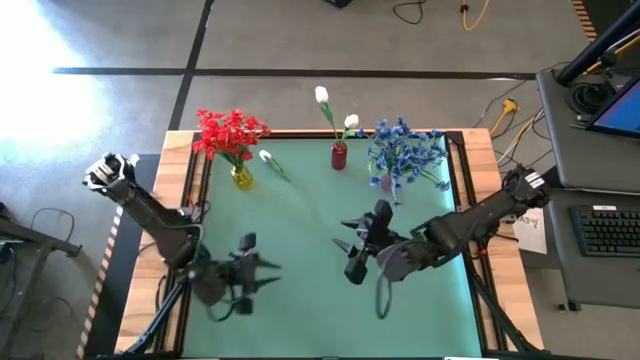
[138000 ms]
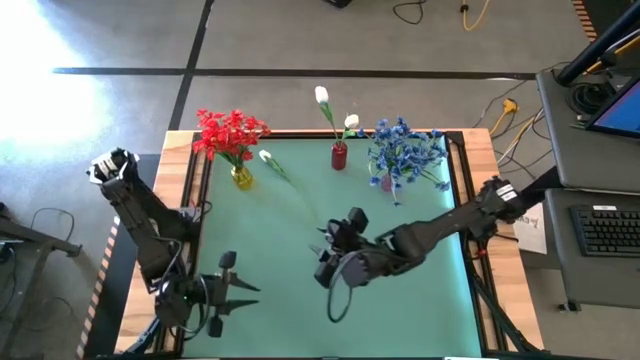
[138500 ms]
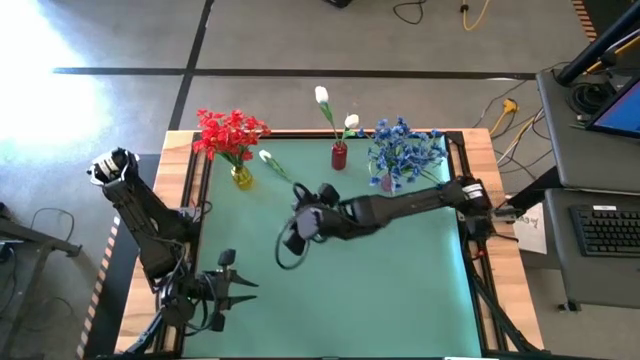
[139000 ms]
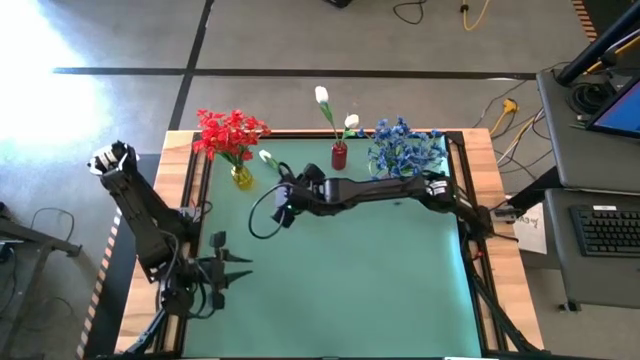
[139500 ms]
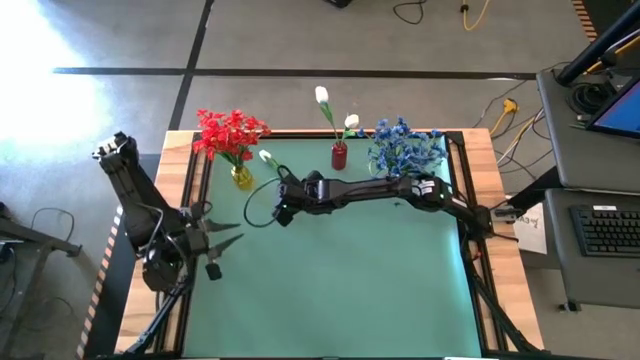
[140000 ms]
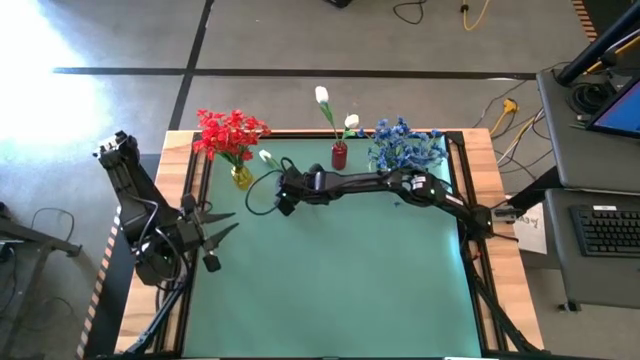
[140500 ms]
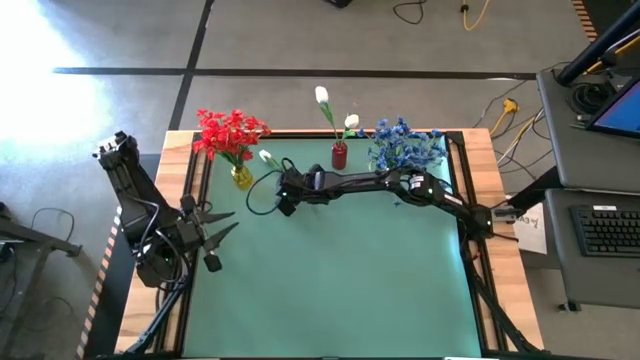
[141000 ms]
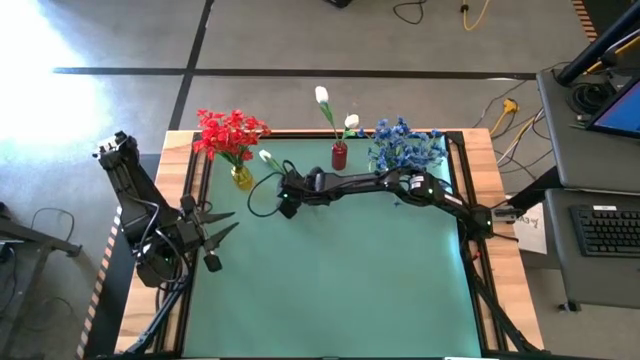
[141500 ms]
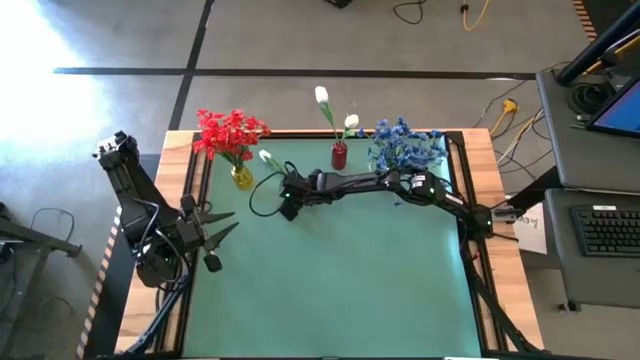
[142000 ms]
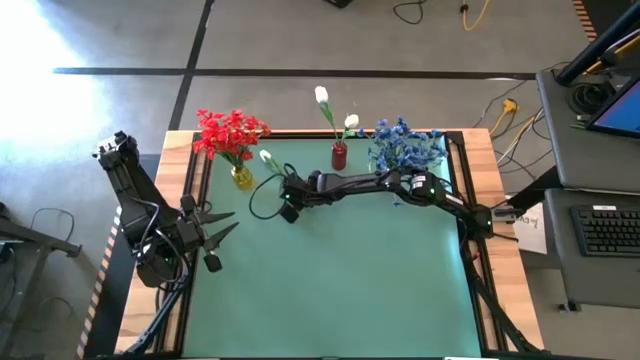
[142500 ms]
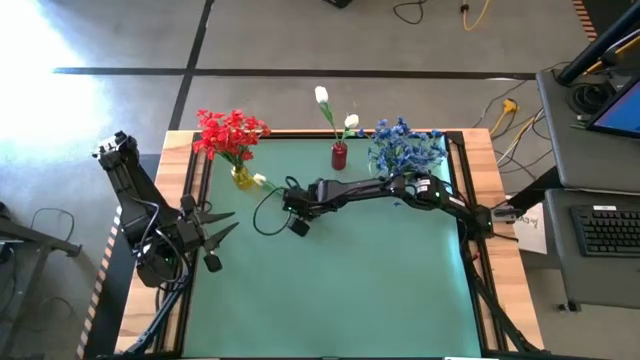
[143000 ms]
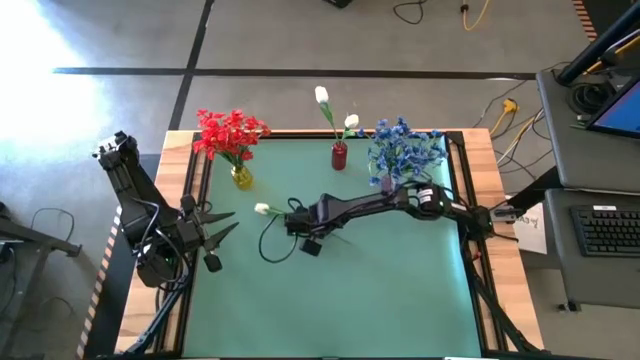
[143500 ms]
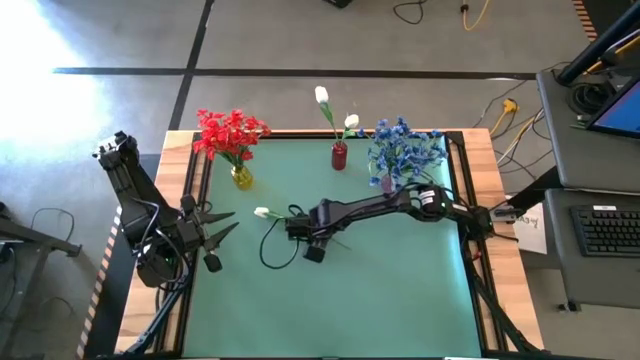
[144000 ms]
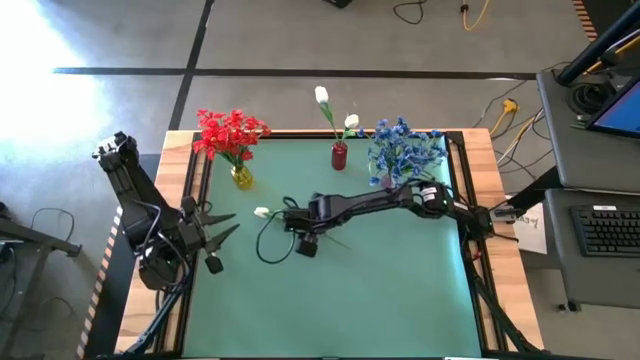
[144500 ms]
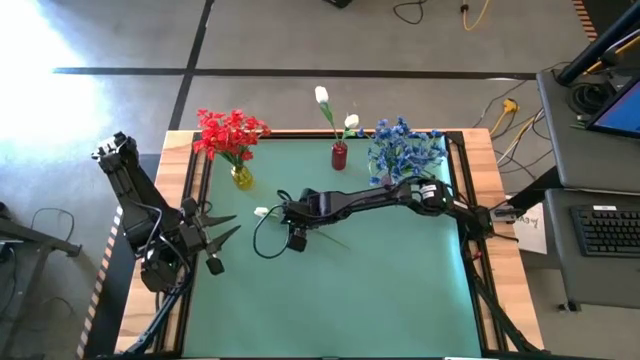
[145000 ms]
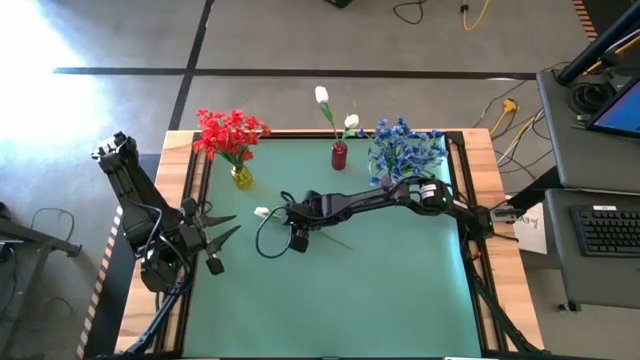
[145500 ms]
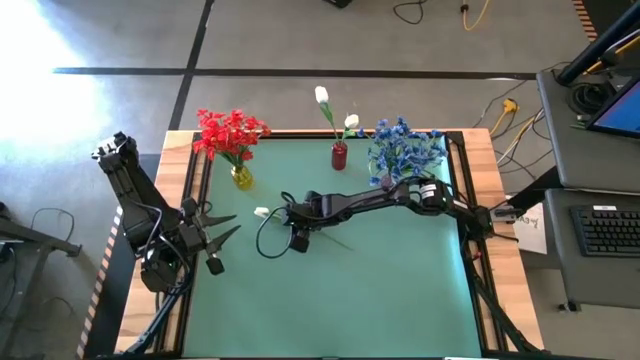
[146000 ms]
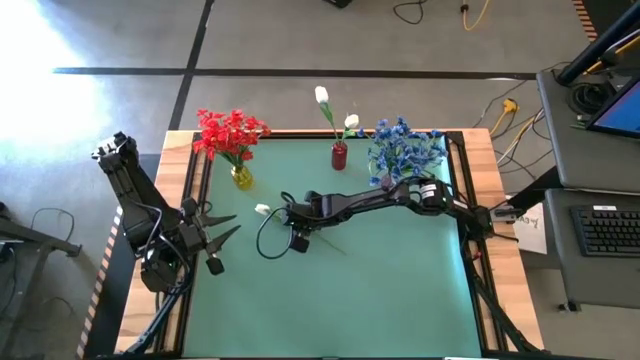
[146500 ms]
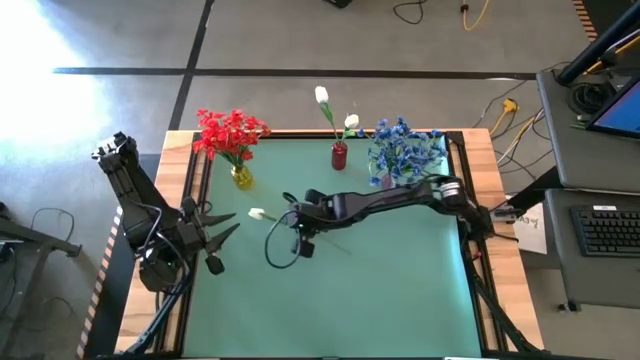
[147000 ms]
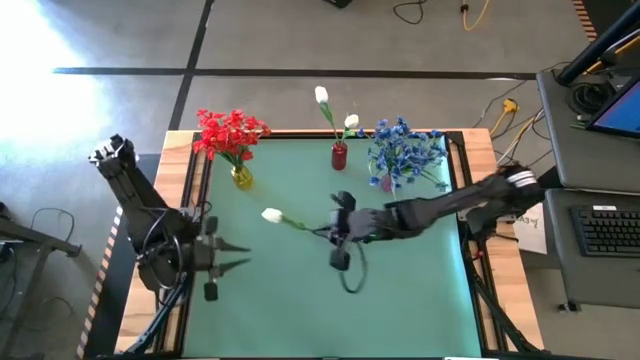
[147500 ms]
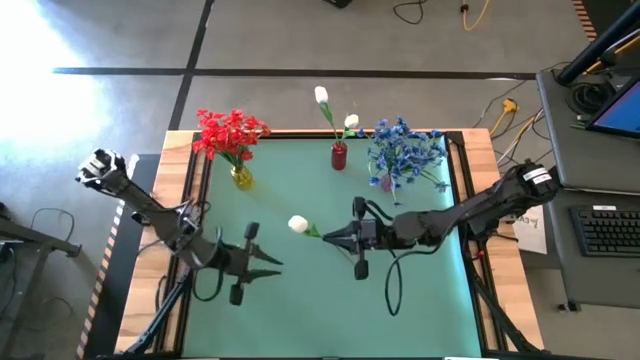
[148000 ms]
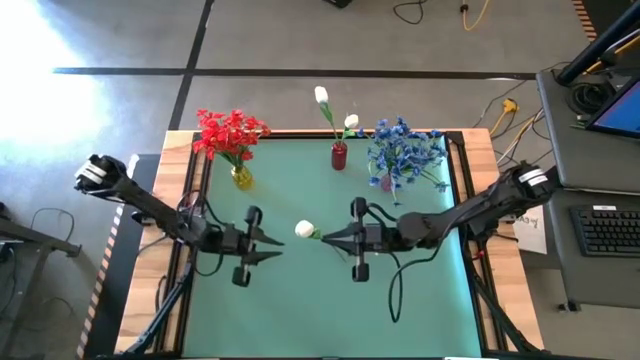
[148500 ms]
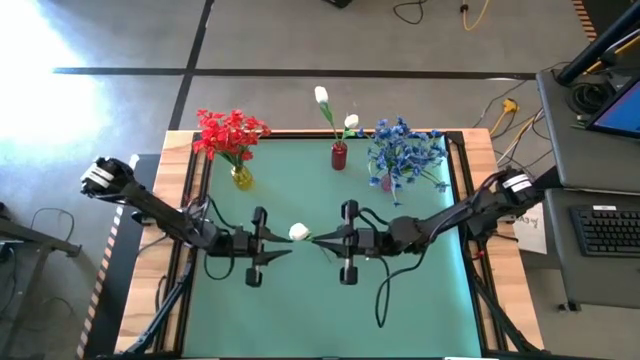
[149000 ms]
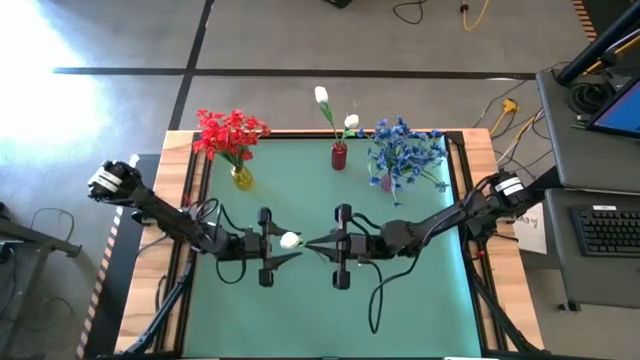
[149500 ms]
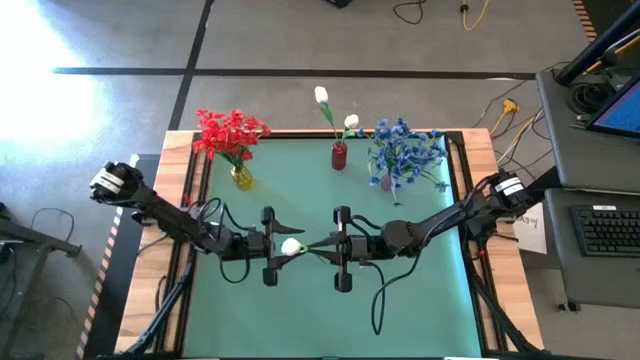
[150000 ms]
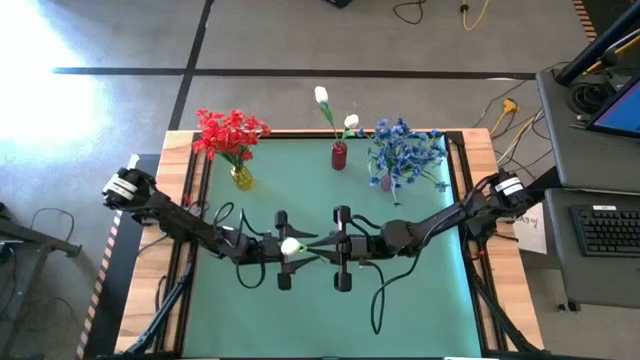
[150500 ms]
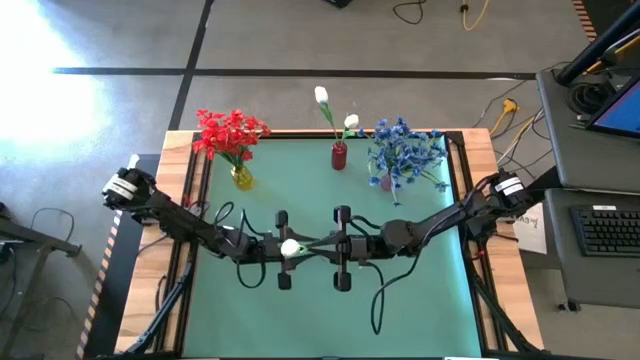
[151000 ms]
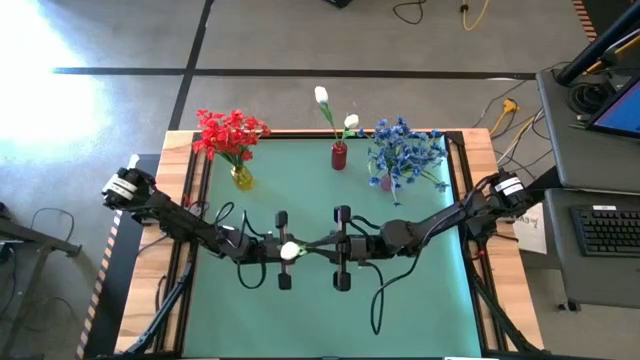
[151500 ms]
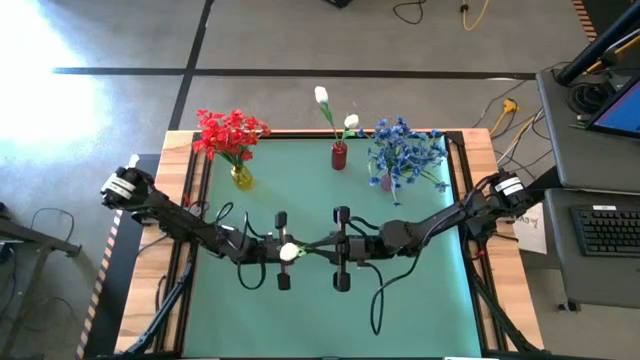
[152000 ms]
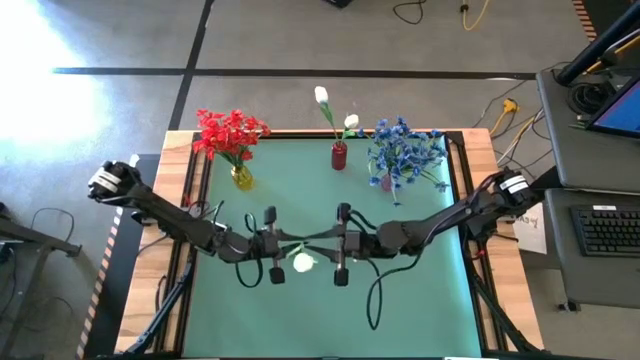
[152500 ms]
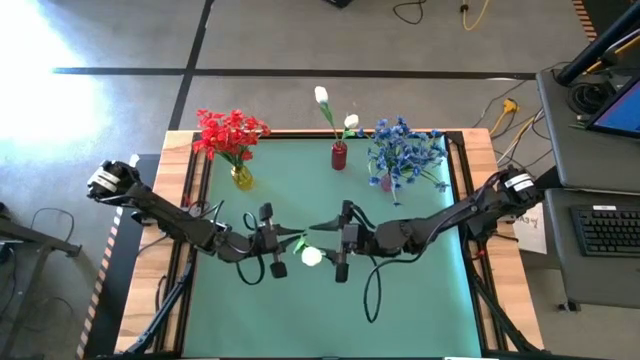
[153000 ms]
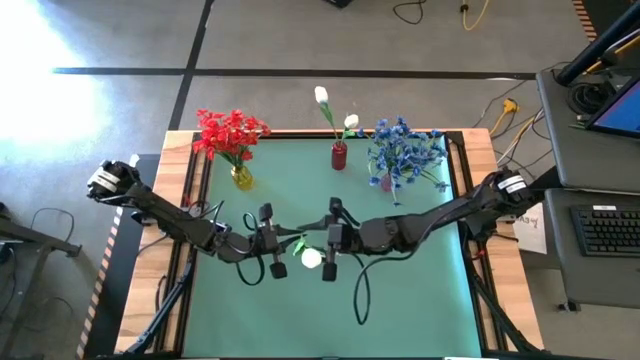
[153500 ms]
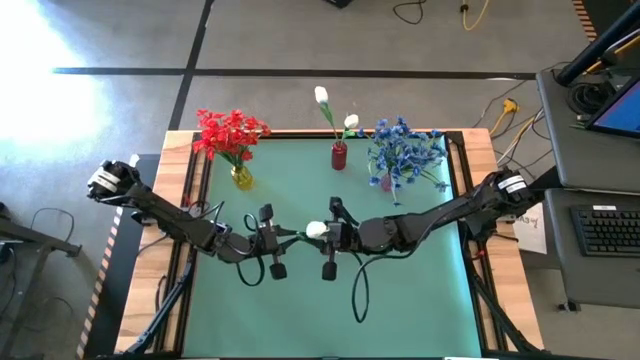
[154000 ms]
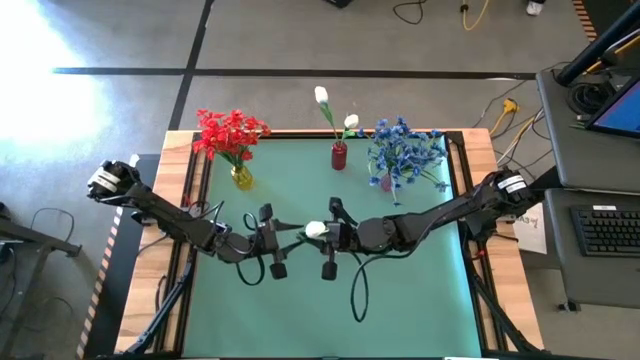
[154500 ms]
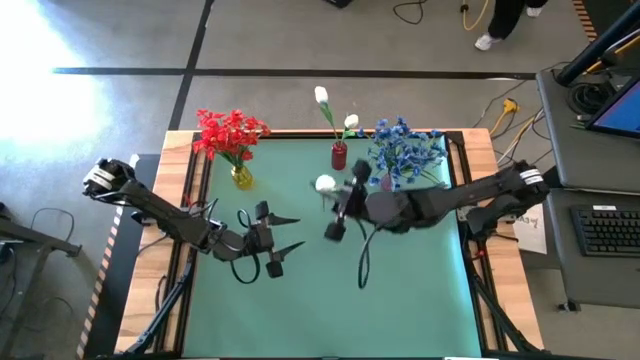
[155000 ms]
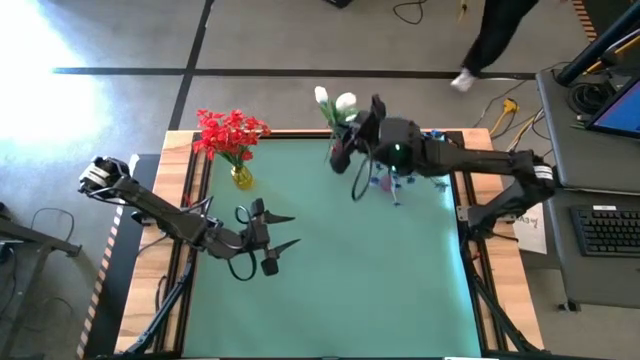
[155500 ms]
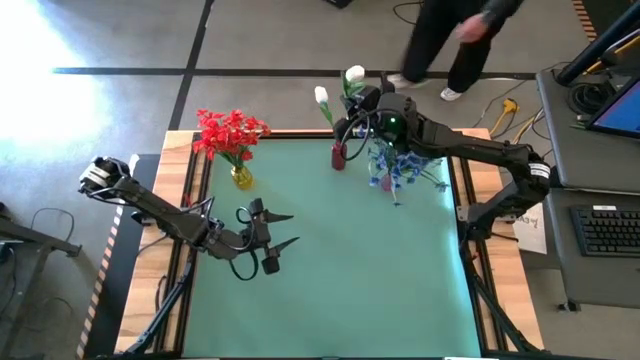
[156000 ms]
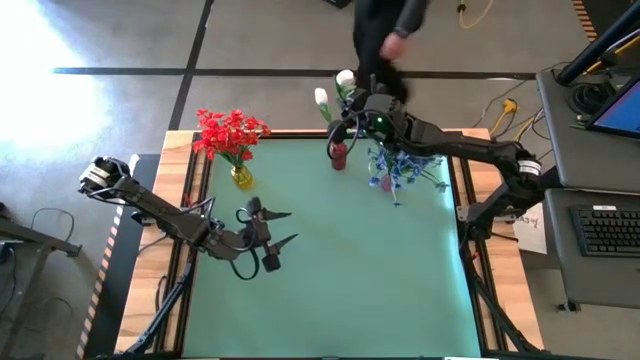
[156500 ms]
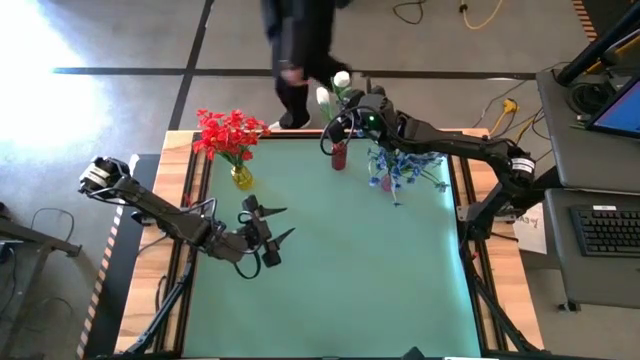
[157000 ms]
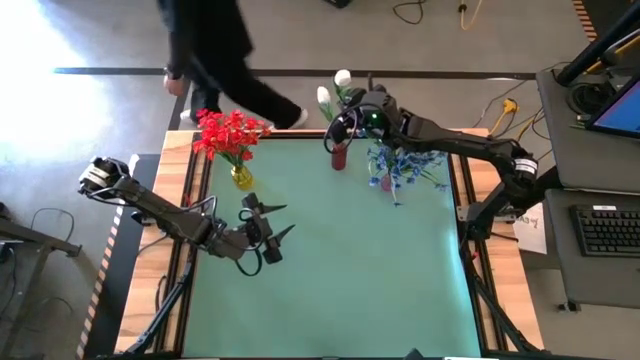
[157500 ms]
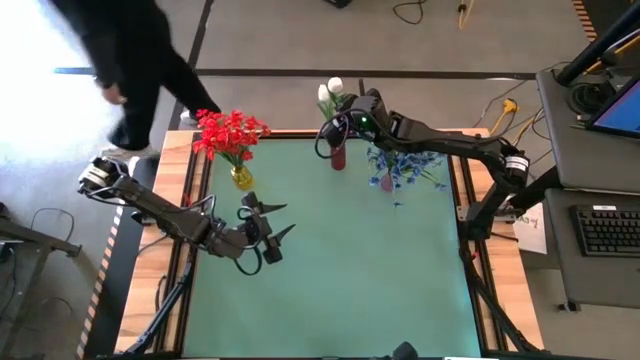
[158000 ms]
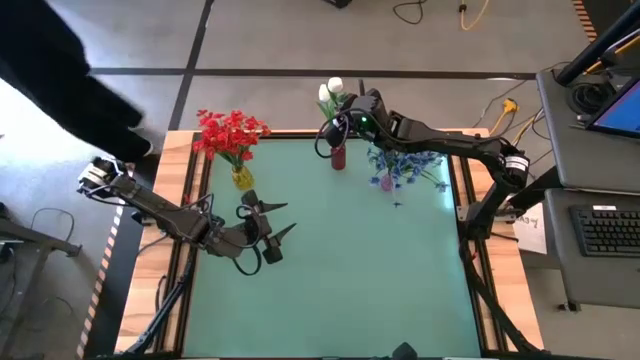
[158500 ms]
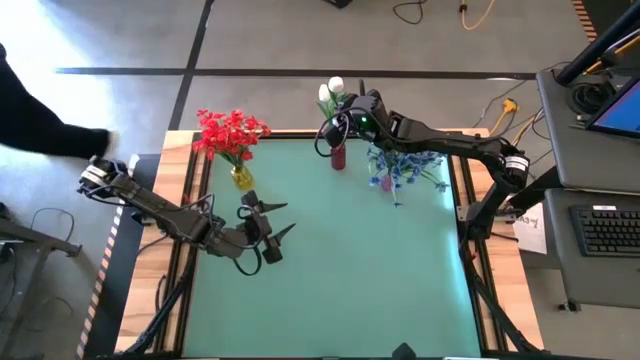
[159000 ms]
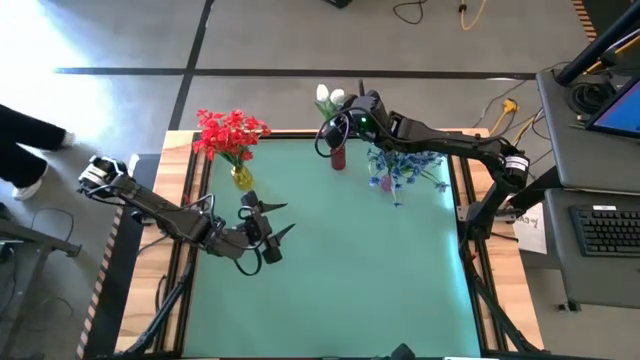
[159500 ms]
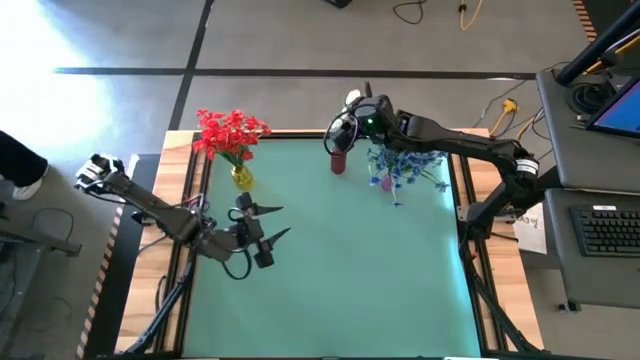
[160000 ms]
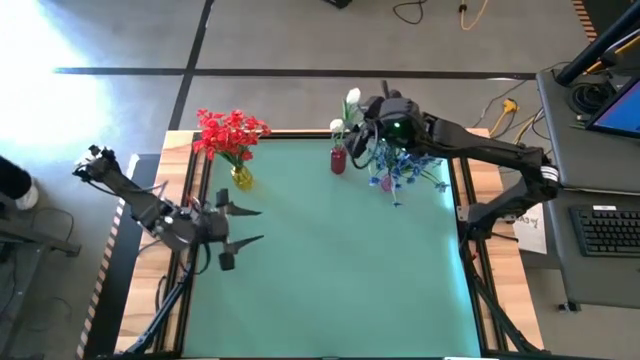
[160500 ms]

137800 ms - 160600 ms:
Task: Sort flowers into vase by color
Put the white flower into the red vase
